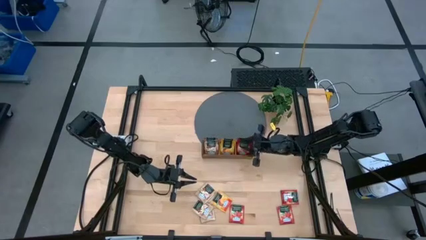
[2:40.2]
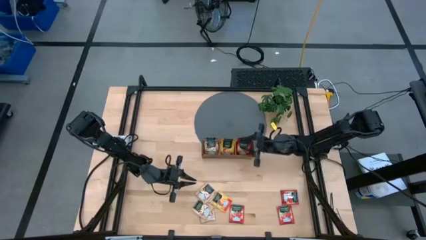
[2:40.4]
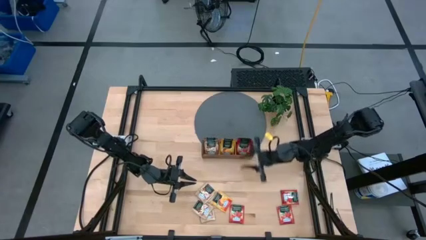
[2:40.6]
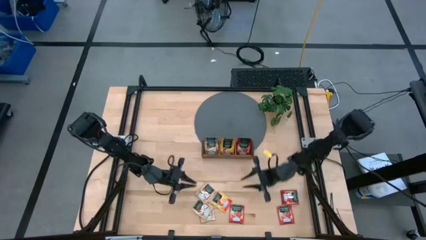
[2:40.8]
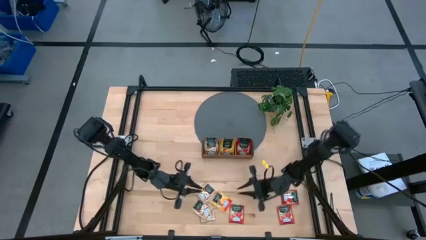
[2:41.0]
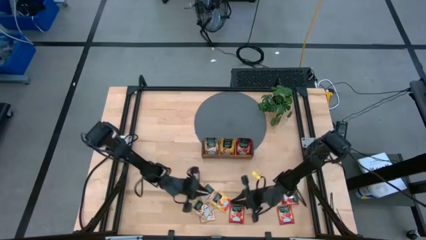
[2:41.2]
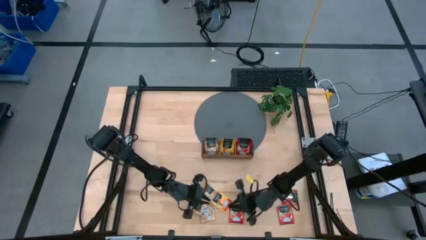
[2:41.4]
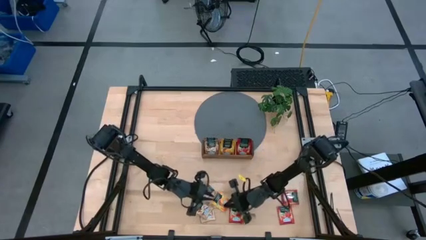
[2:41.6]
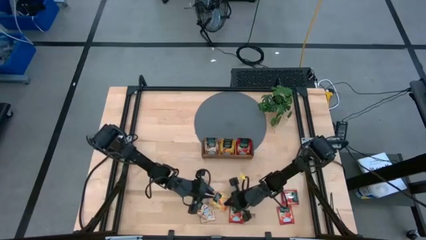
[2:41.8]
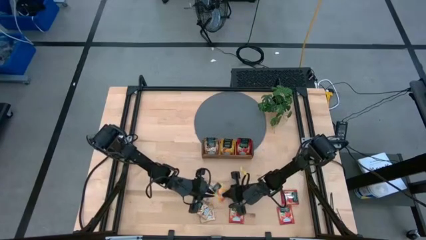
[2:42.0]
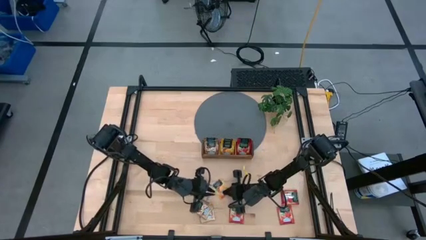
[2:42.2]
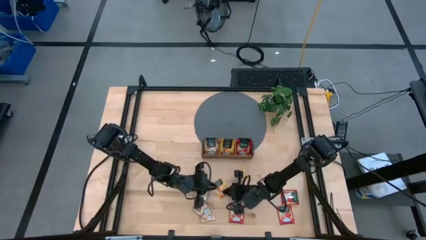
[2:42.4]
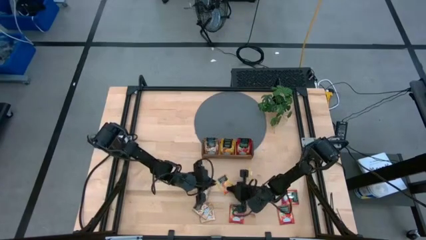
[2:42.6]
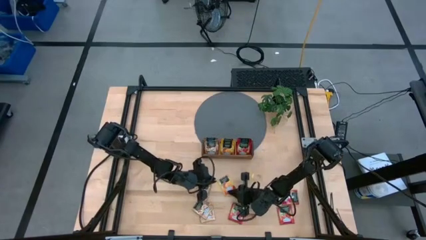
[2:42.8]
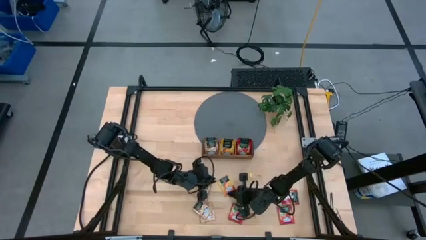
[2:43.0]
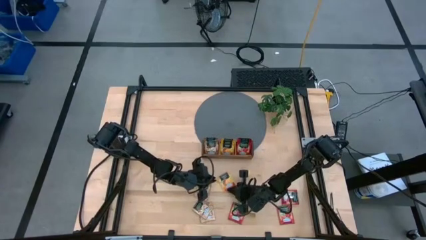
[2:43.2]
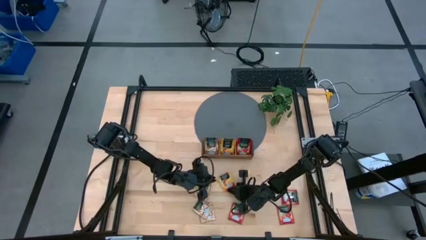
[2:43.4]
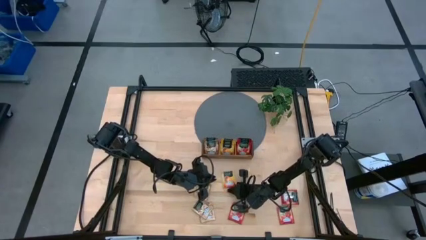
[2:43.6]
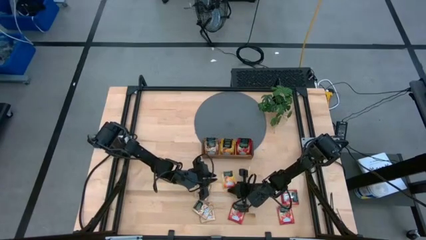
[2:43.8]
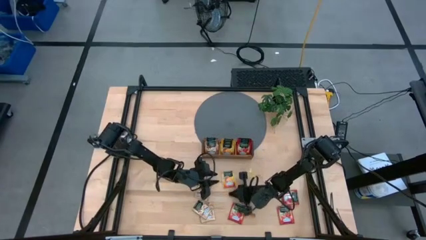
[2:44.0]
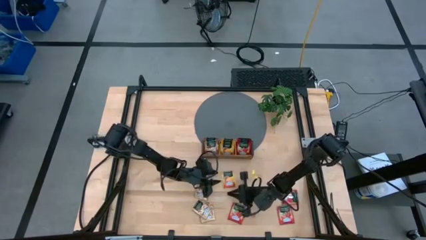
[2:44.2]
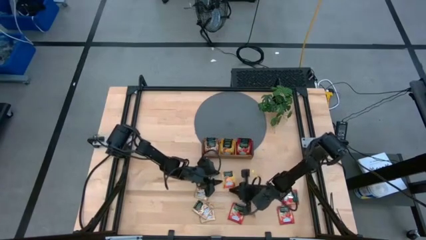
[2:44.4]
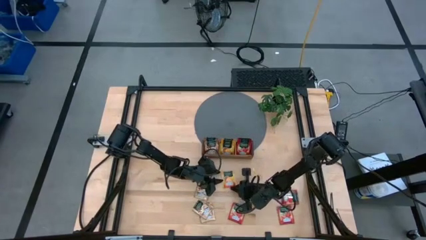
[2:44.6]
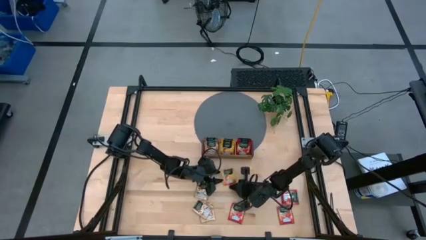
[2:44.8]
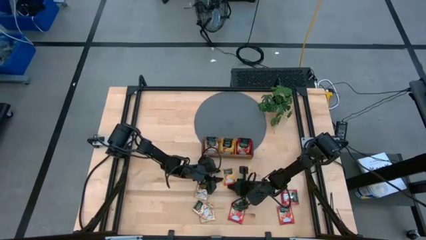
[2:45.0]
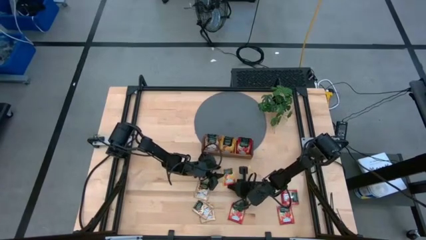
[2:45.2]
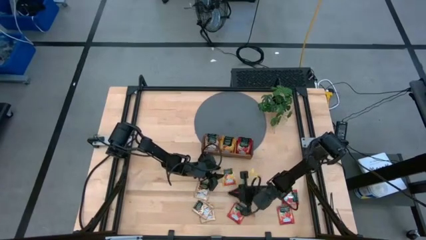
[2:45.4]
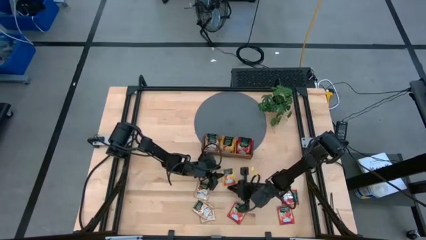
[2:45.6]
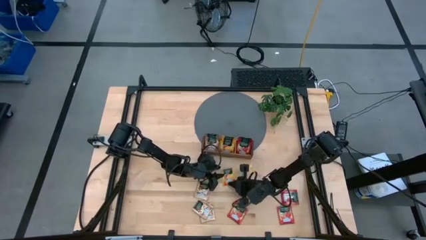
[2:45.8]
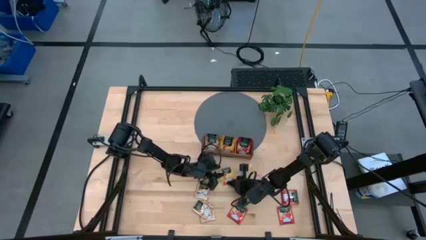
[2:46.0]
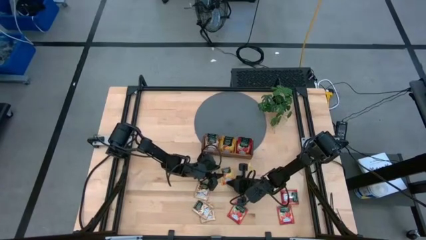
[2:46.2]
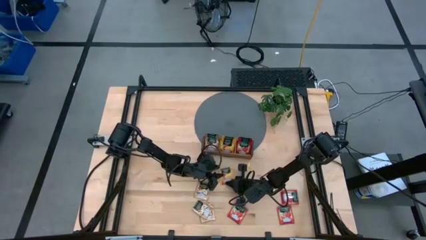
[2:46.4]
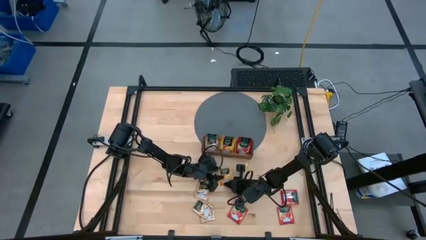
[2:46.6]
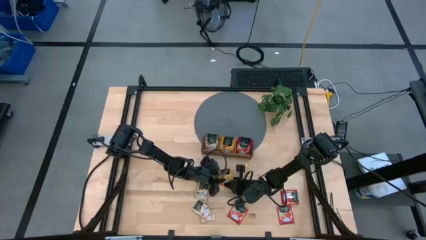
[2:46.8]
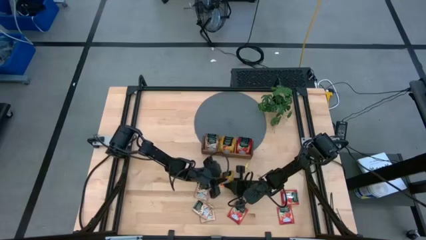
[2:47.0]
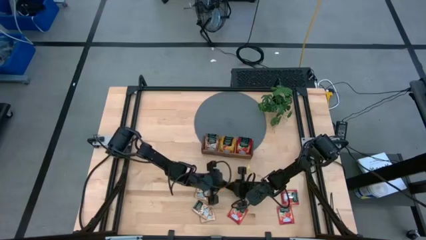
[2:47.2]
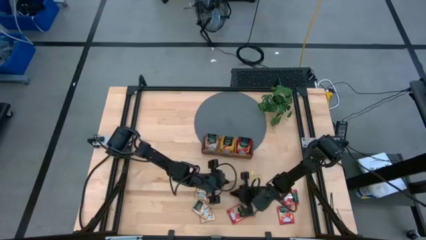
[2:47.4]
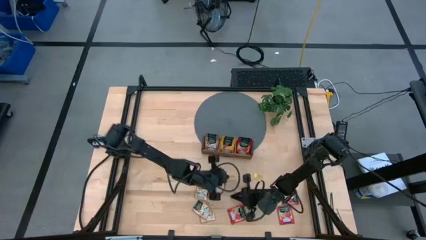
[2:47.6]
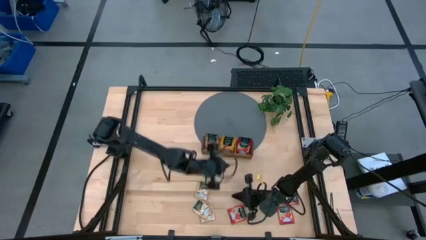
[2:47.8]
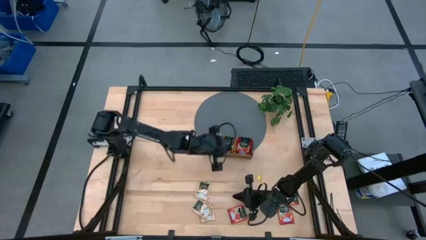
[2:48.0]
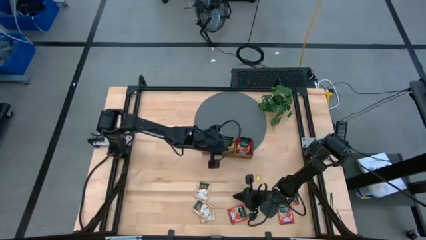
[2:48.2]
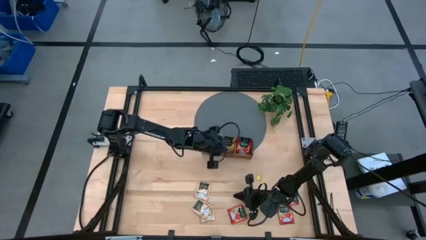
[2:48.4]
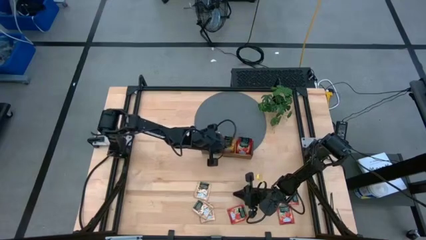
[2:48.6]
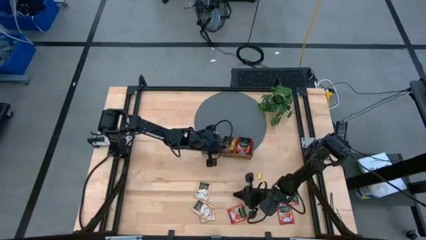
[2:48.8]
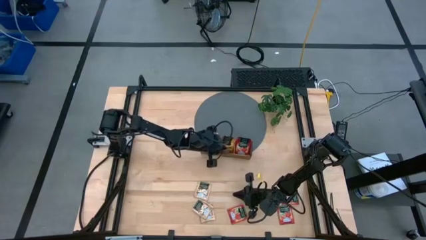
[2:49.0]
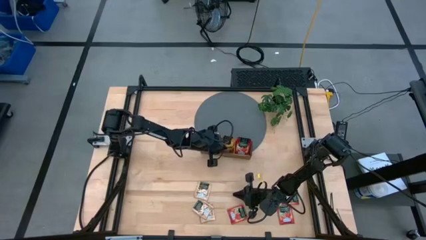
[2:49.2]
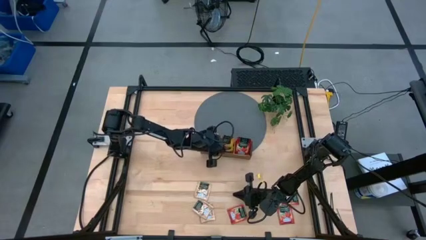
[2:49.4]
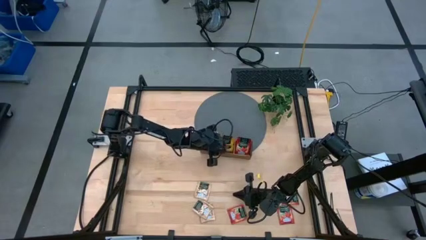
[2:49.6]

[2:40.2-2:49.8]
Task: Pick & Place Tea
Put the yellow tea bag into the middle wooden organizer

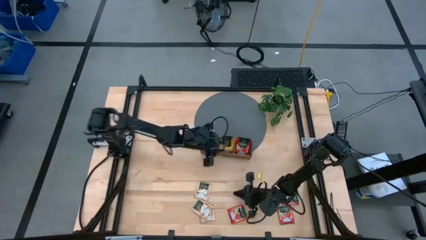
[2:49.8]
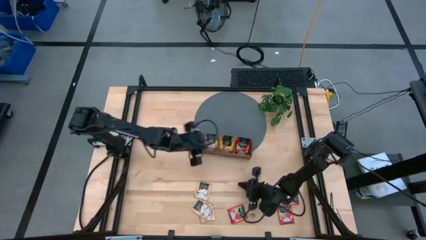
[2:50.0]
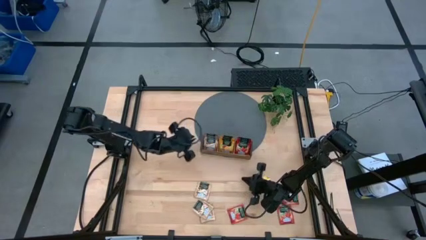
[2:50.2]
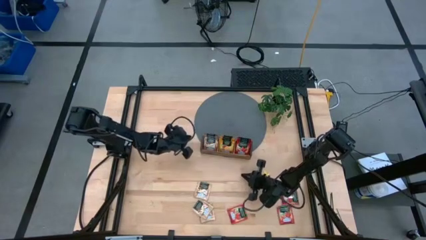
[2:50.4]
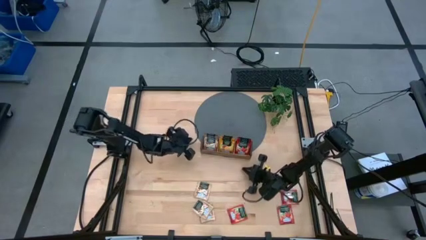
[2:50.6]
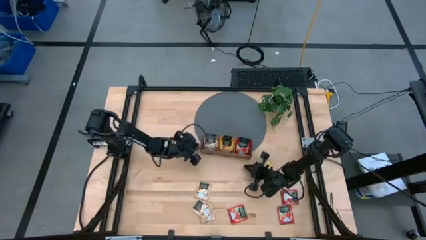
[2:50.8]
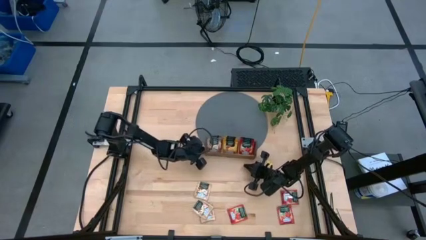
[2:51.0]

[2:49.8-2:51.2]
Adjust the wooden organizer
